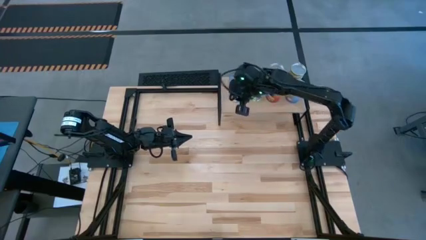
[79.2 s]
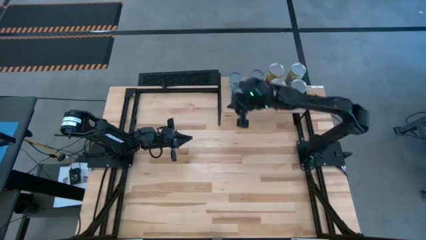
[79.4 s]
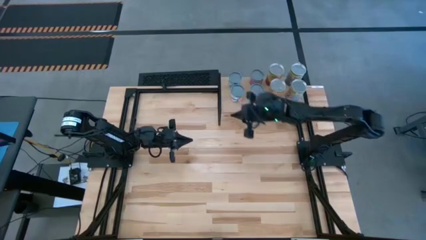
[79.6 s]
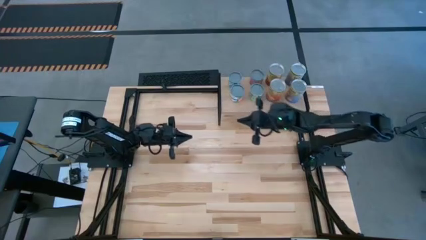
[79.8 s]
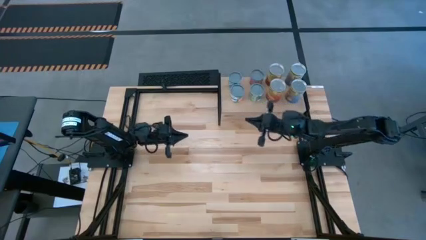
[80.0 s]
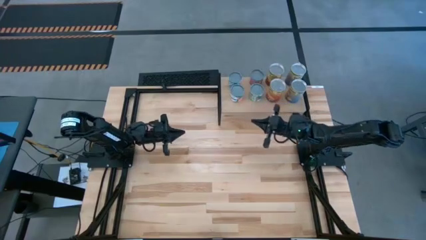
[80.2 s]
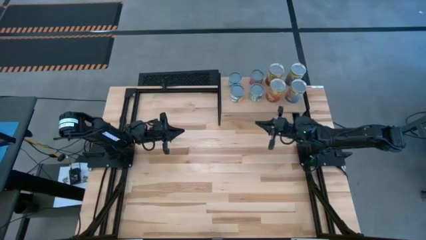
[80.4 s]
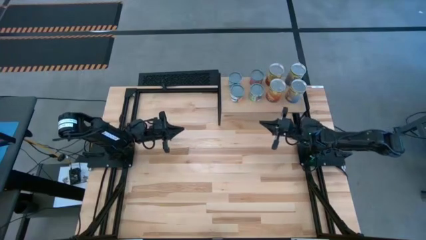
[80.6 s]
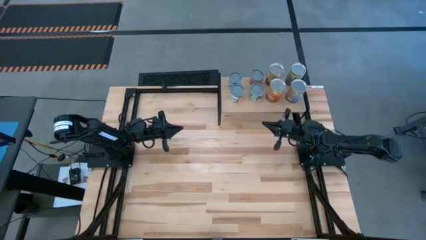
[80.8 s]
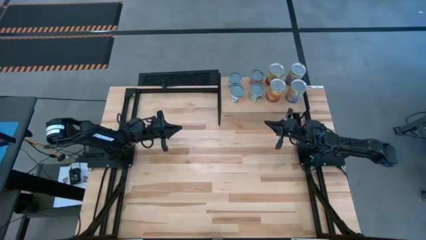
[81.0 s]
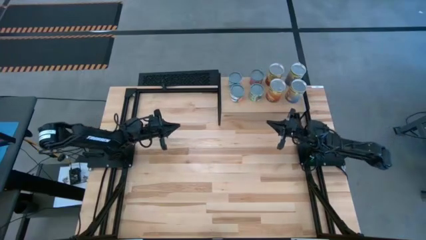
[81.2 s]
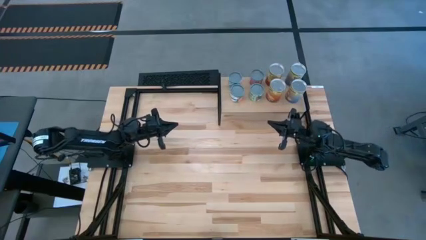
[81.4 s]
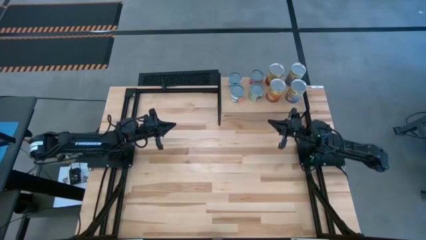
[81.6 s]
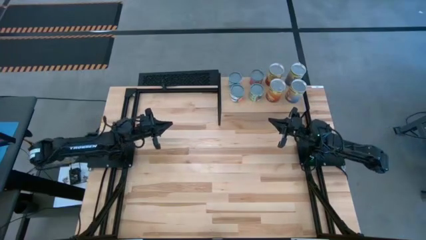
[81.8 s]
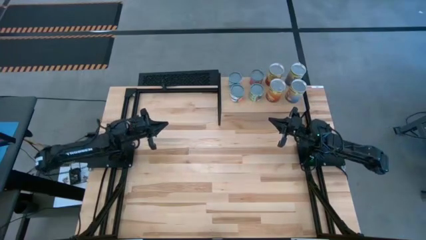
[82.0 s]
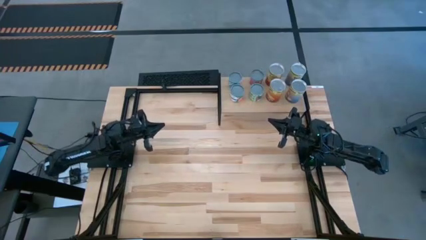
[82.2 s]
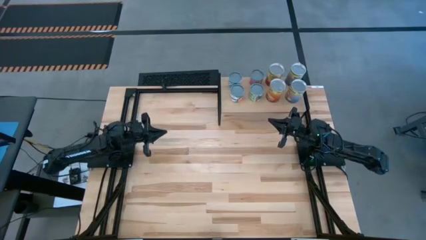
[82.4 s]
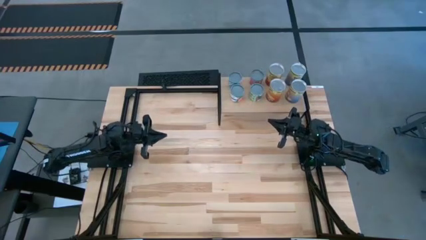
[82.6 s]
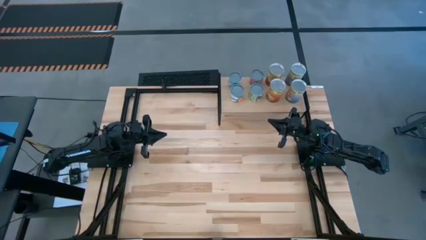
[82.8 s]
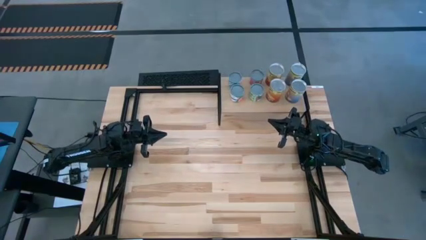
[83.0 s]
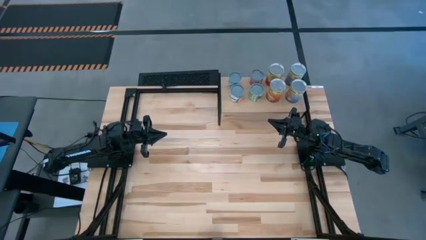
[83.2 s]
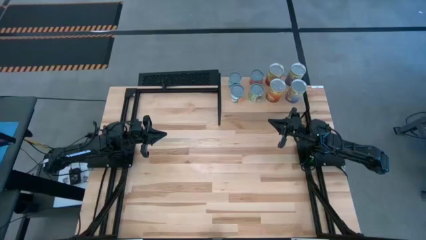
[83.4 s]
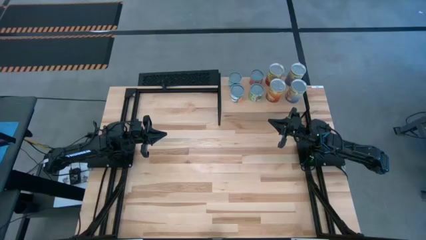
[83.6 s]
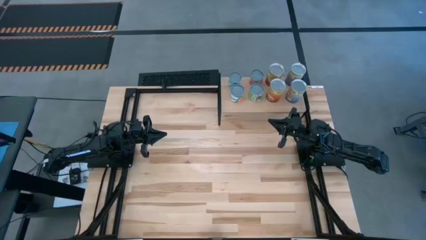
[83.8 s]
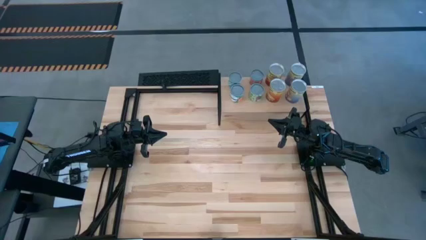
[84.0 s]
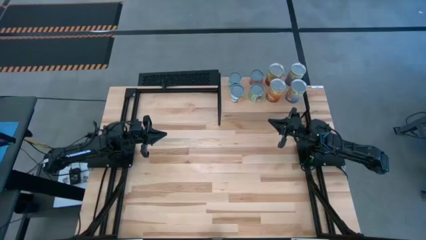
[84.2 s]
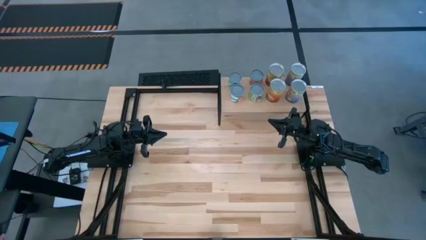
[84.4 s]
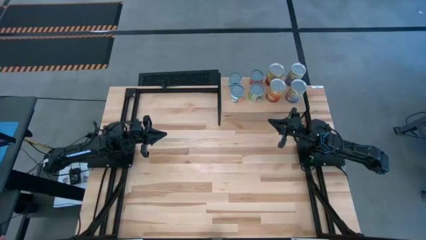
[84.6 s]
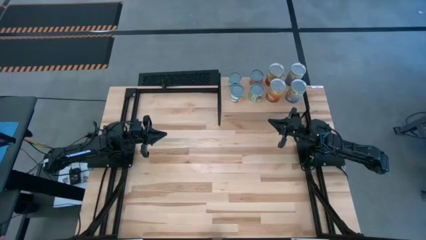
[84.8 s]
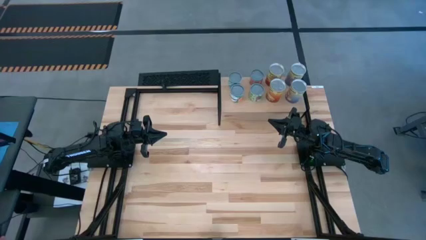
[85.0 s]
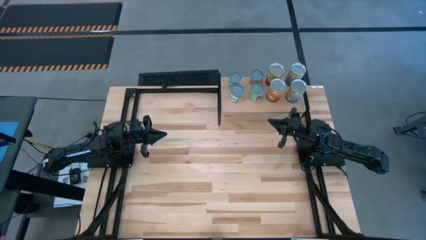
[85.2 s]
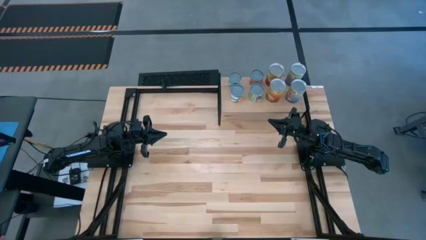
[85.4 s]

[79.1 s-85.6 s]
Task: Pick and place cans onto a shelf
Return to Home Position

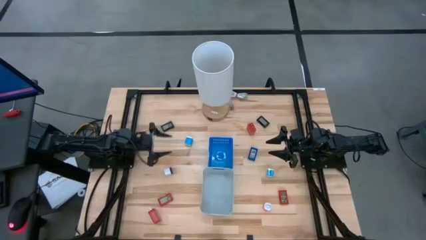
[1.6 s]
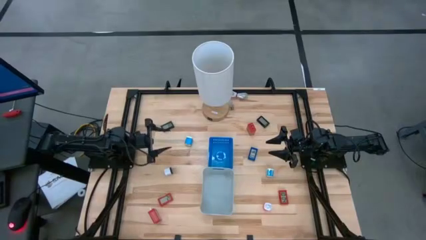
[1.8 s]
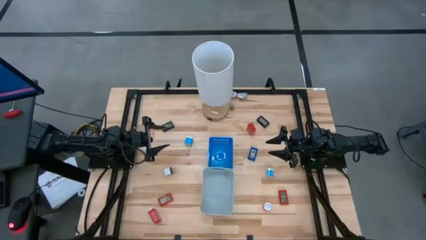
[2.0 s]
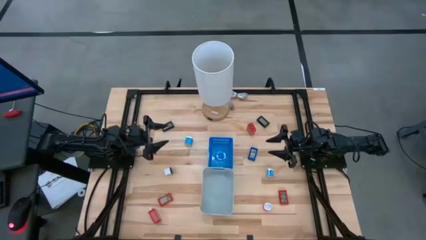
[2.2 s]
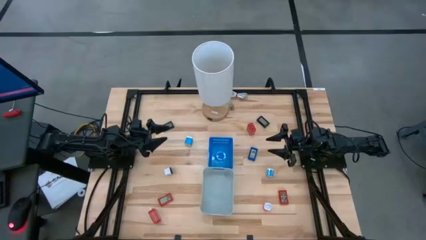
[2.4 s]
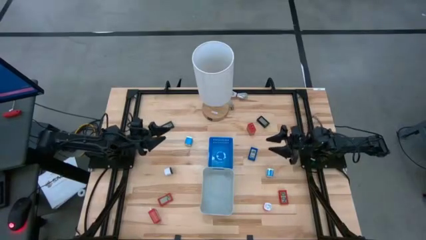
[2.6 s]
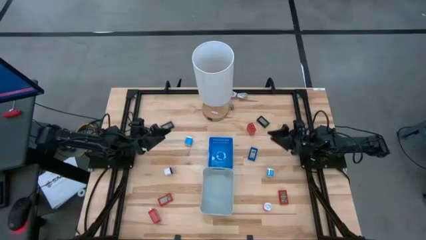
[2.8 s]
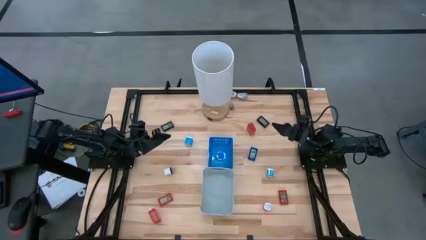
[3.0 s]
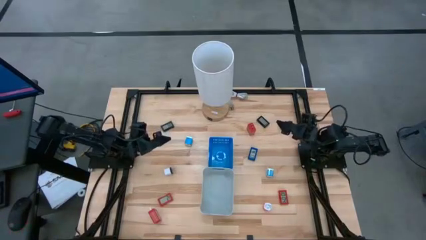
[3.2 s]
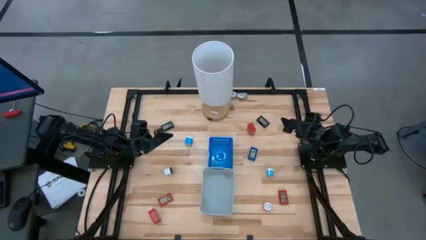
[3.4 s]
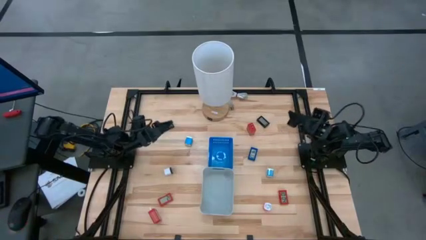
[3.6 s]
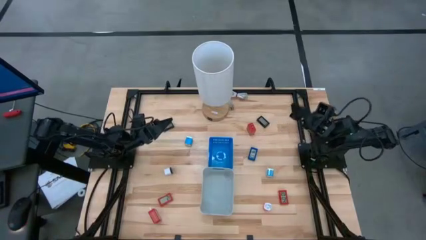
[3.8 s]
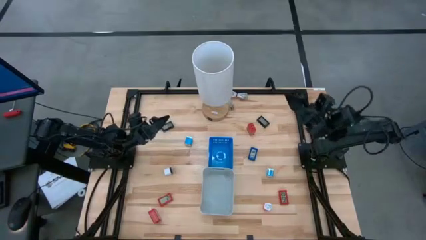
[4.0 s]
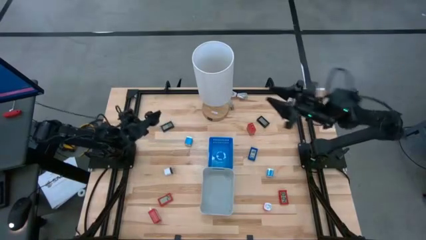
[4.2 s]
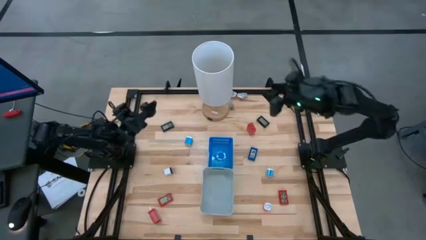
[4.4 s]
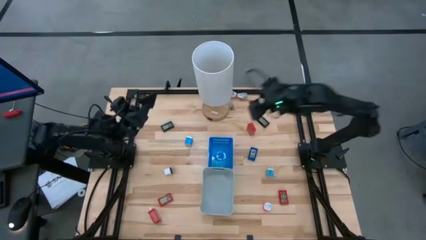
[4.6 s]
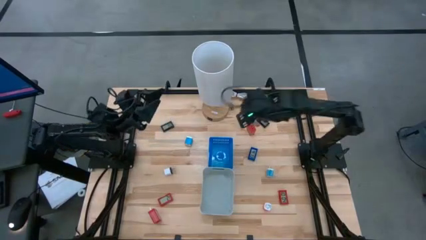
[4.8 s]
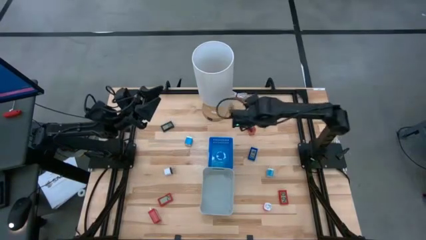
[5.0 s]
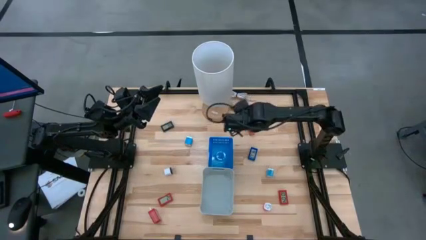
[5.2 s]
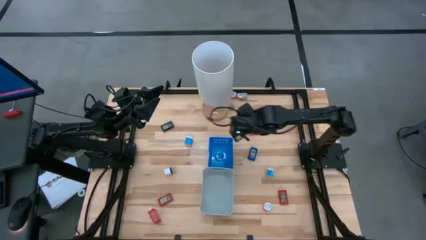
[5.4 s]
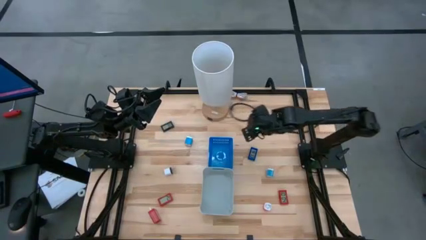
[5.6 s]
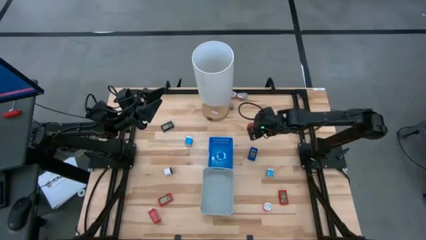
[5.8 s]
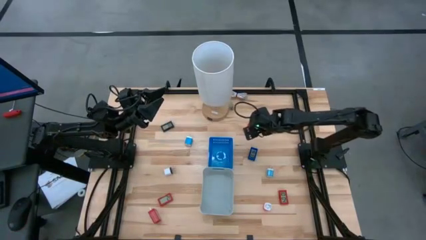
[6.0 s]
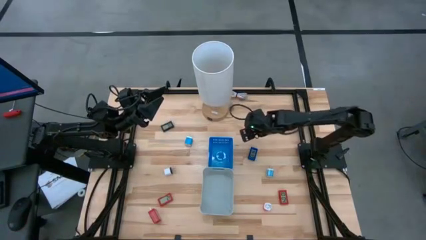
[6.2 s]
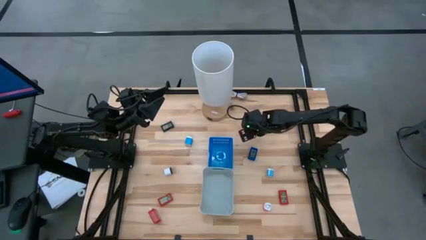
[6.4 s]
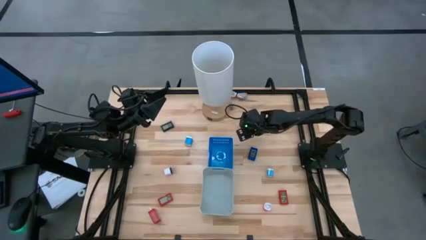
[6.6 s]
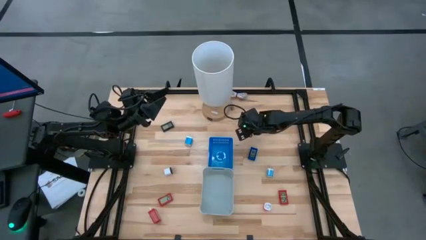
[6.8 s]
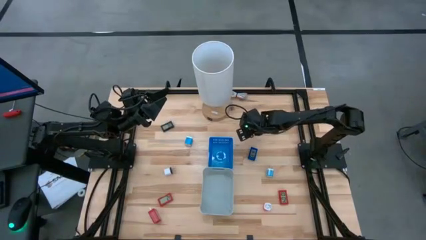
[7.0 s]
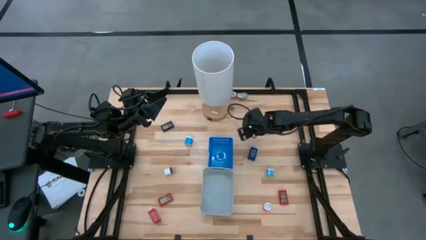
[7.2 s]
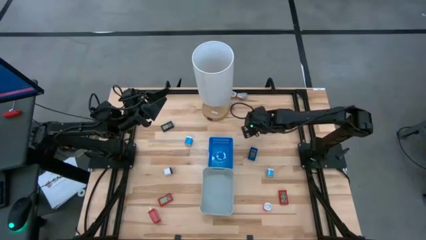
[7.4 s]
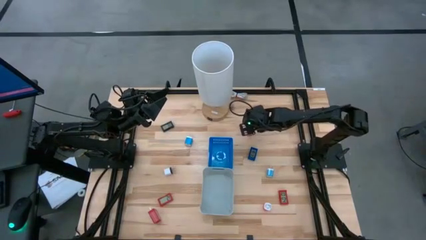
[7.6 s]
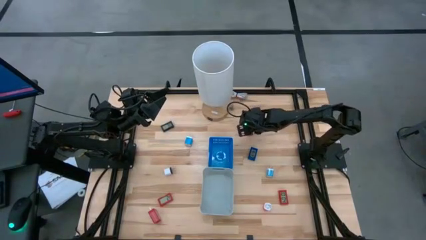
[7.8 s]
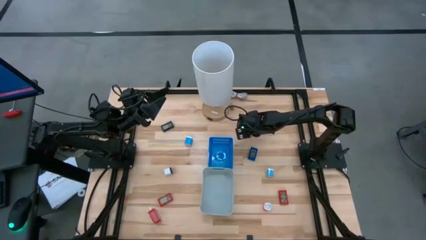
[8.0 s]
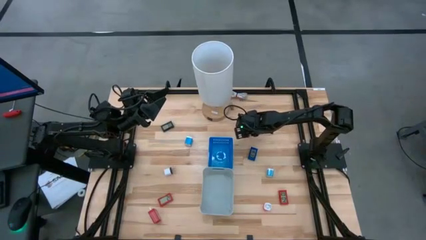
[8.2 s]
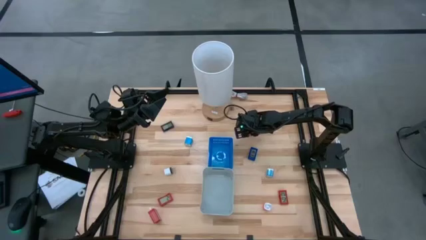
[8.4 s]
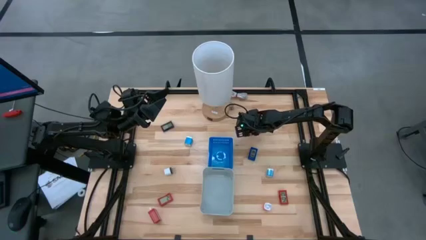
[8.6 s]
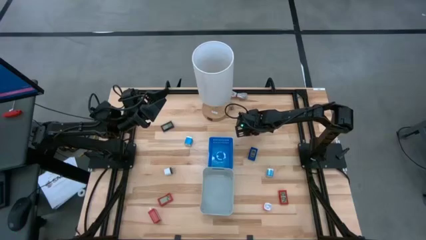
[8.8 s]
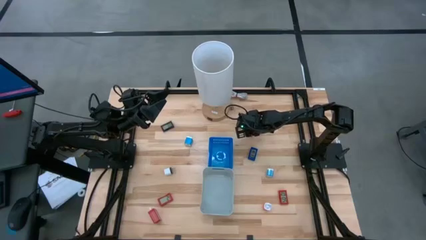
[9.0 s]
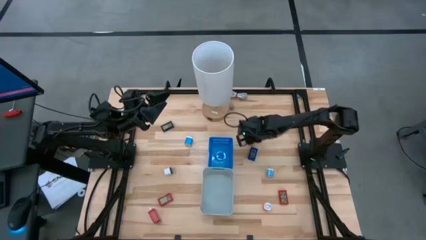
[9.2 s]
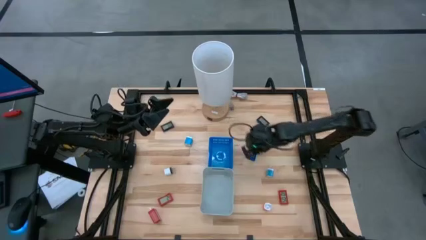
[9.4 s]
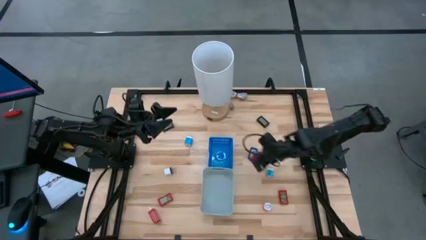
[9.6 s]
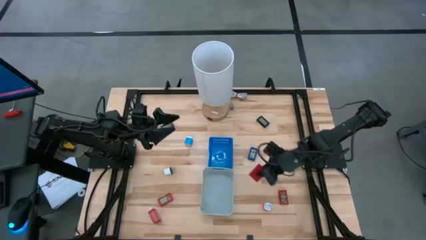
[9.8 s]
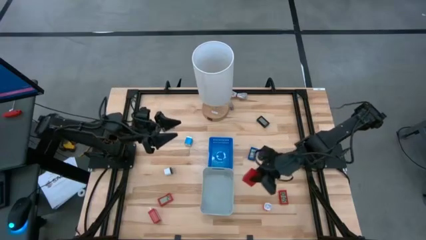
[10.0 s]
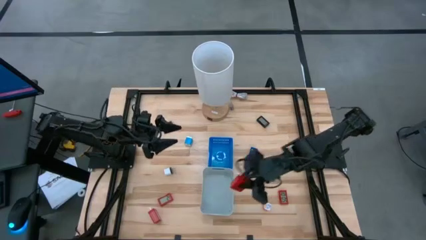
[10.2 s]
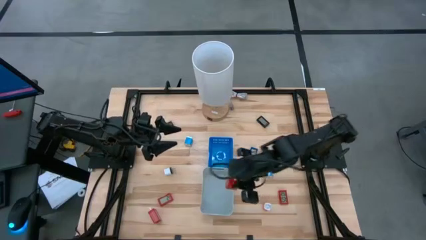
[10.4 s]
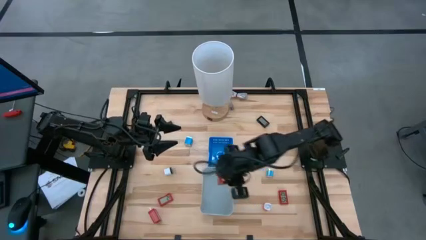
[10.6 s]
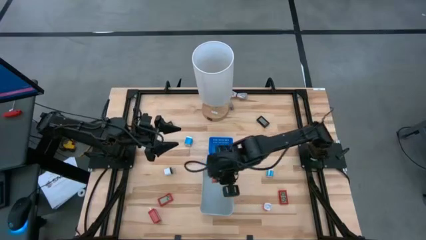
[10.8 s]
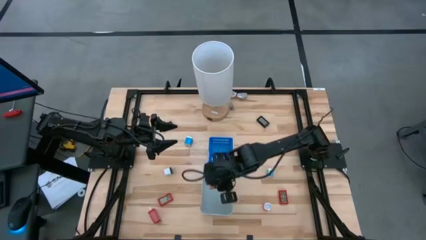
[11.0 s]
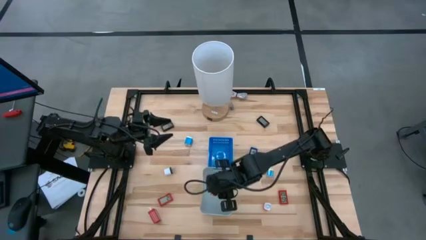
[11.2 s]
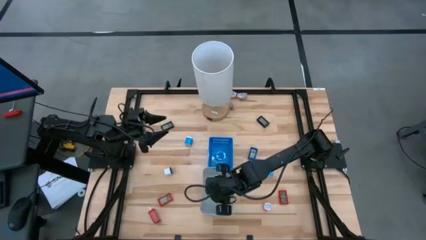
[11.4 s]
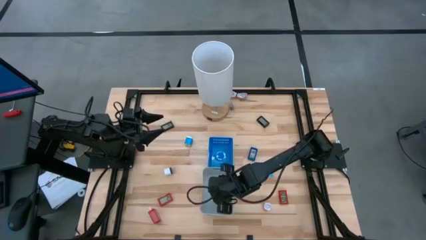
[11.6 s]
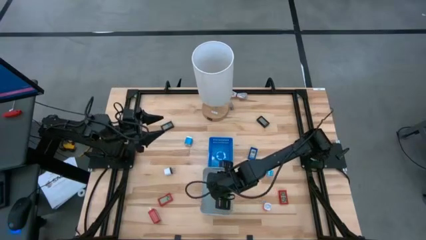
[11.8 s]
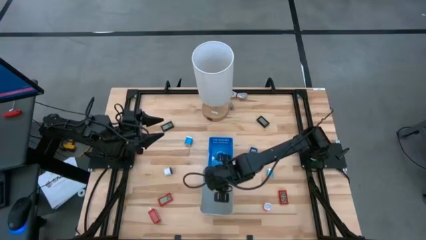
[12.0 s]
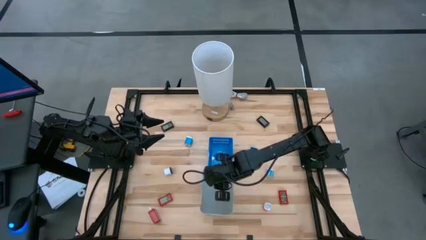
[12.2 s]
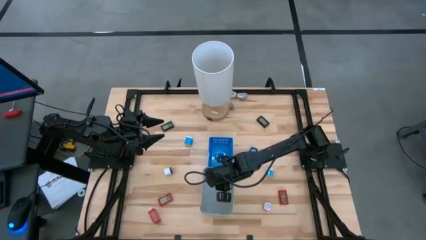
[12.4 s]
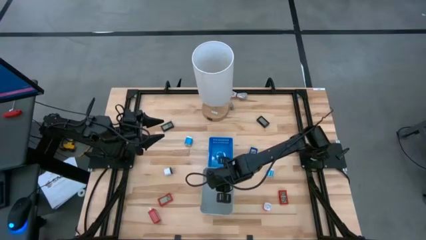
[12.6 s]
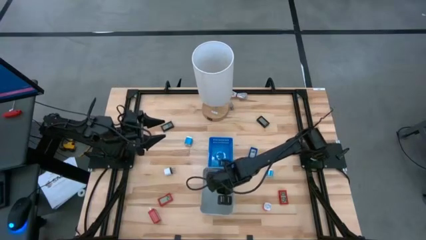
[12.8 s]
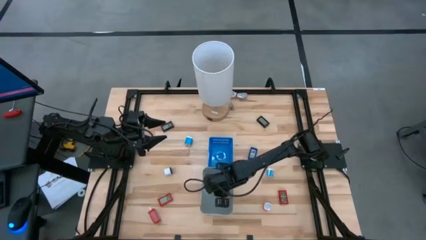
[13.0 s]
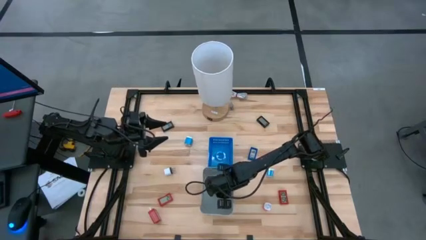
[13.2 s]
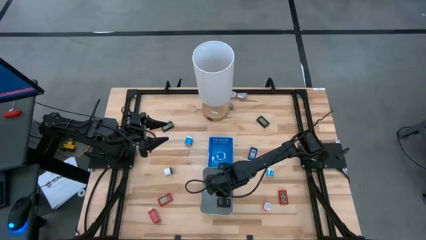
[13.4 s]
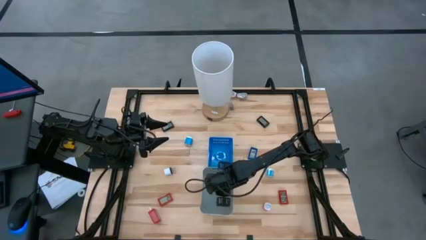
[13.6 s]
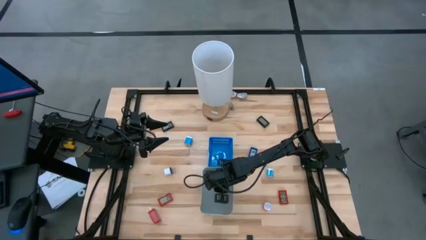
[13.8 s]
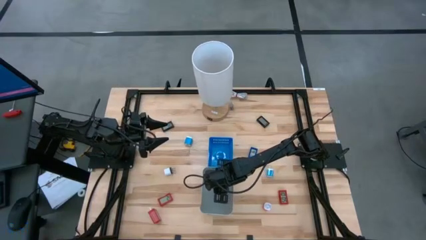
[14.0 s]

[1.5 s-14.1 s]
Task: Pick & Place Office items
Put the top red charger adapter into the gray bin
